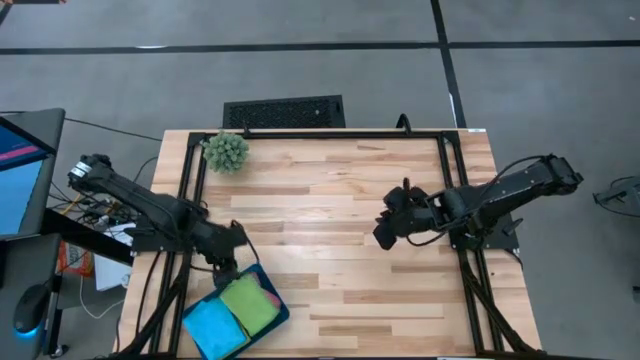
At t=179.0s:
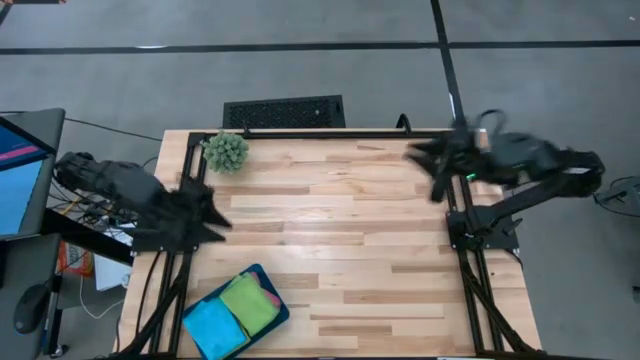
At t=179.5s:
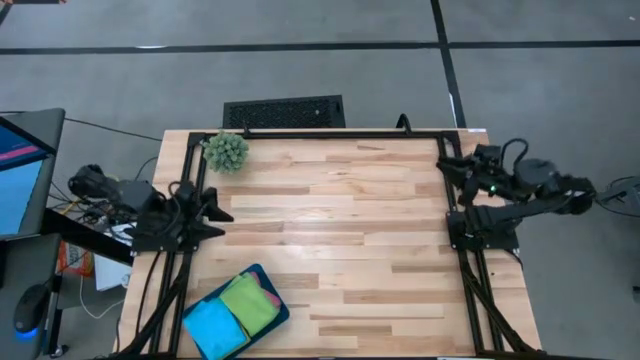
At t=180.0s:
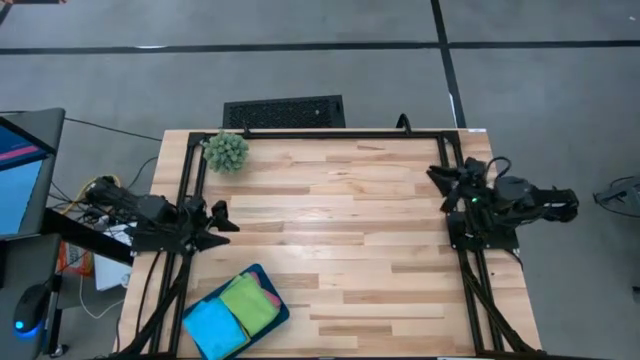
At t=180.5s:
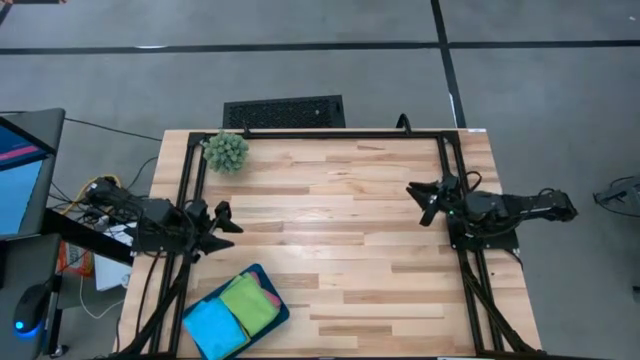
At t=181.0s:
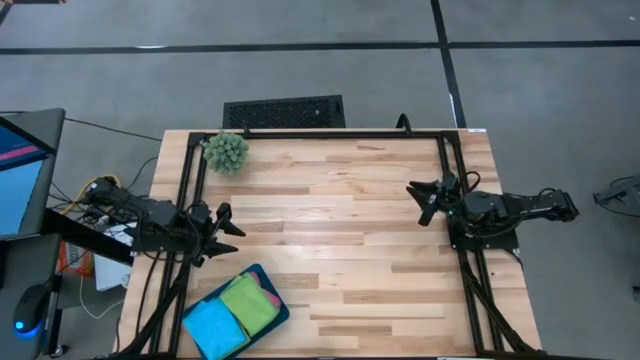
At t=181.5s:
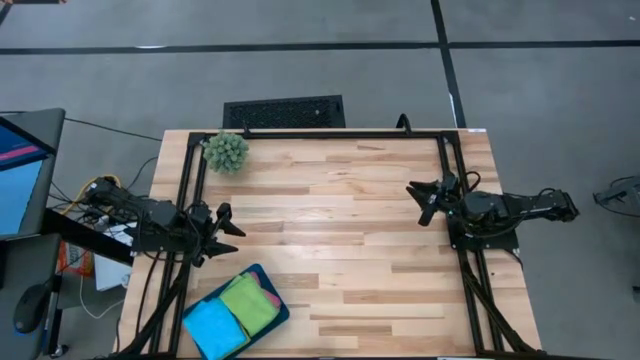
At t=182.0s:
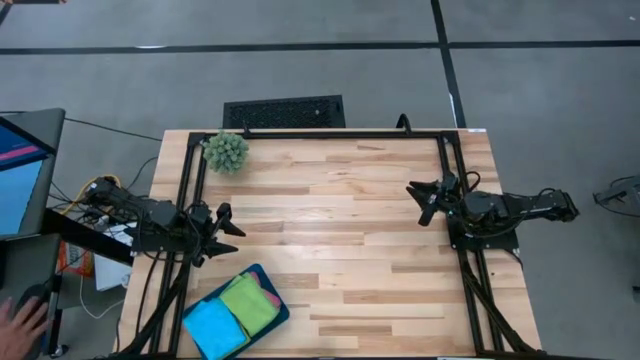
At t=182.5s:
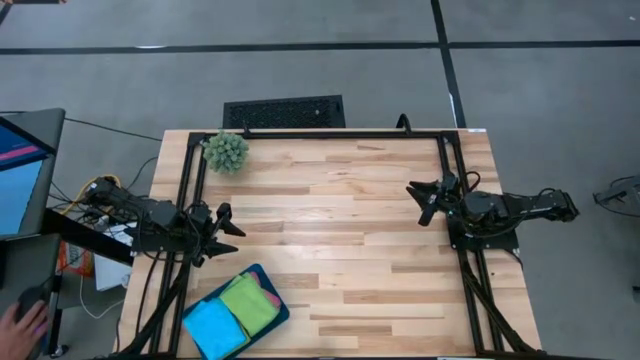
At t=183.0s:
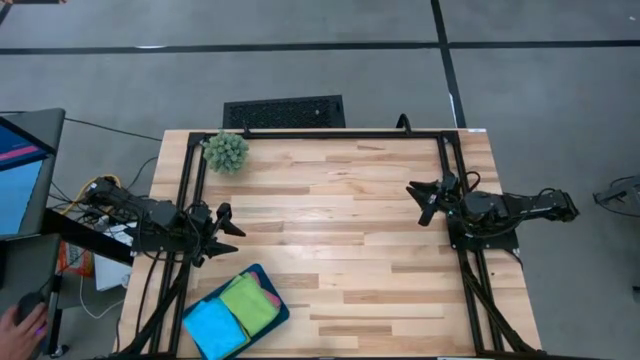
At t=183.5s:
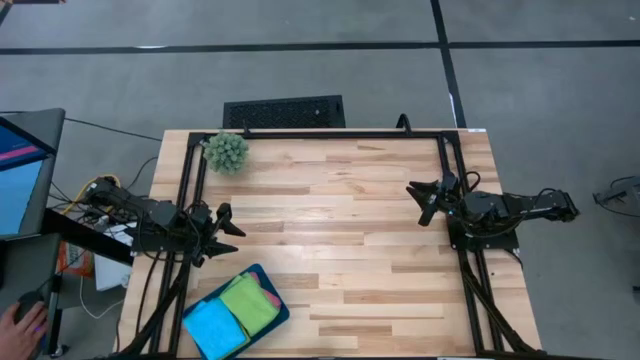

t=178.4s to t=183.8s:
Task: Fold microfiber towels
Return to Home Position

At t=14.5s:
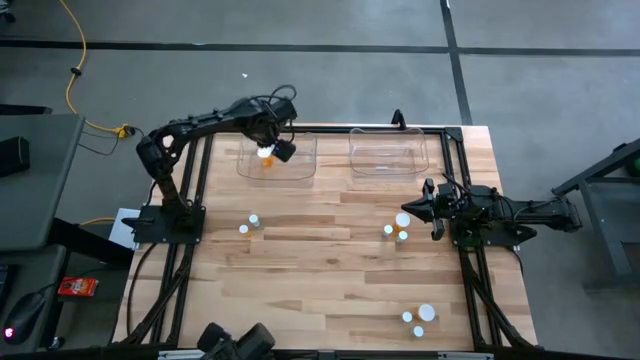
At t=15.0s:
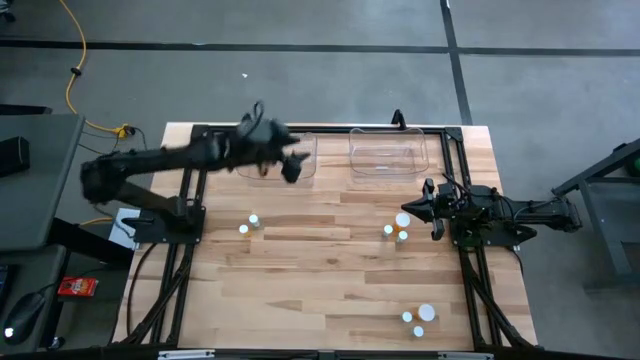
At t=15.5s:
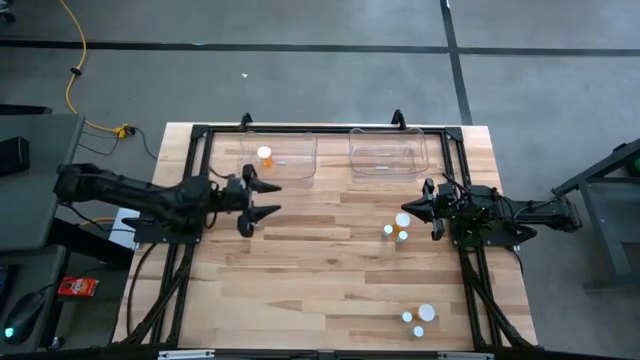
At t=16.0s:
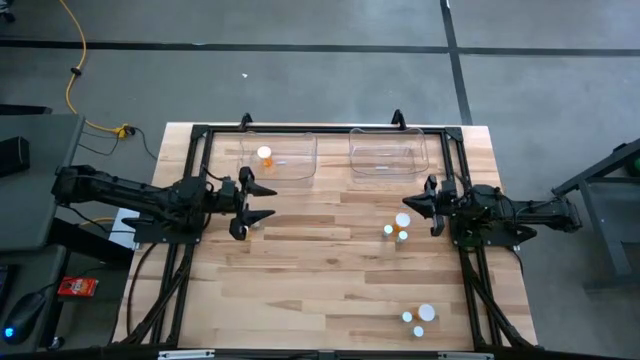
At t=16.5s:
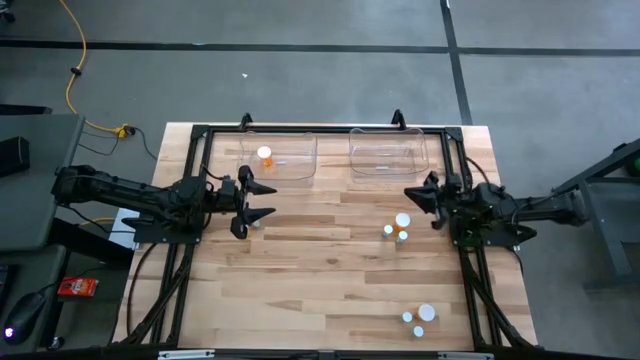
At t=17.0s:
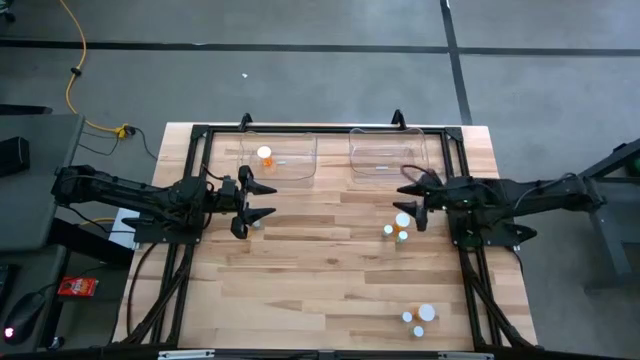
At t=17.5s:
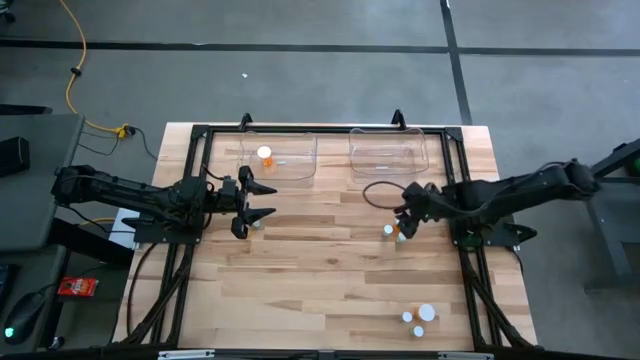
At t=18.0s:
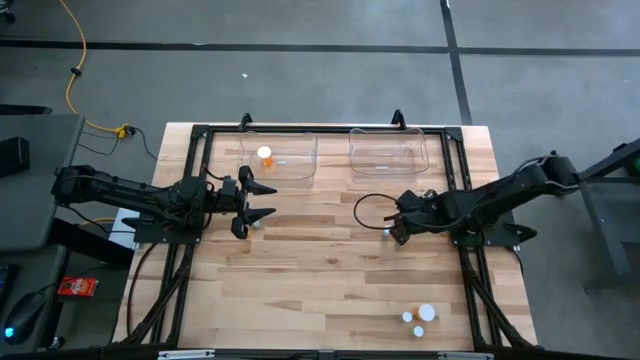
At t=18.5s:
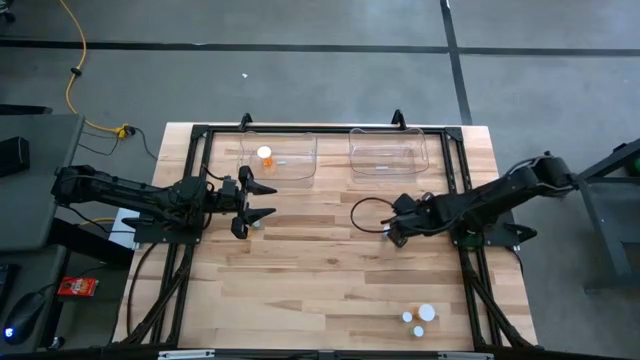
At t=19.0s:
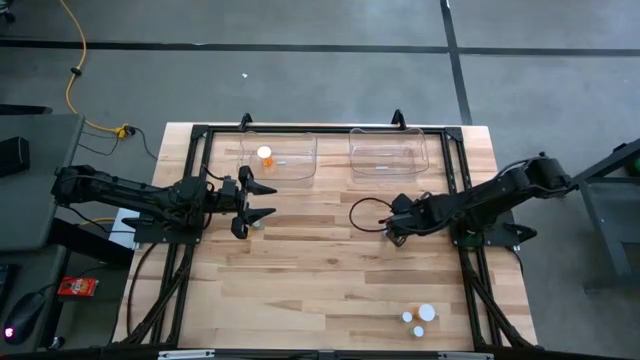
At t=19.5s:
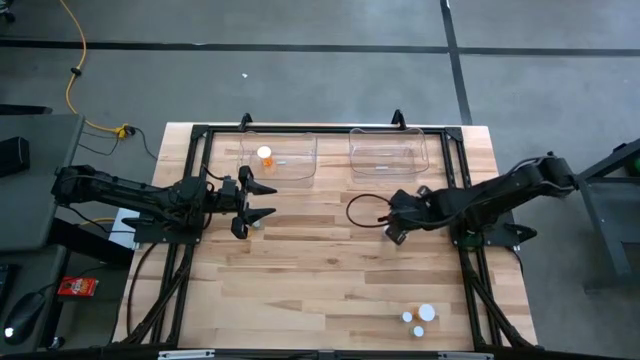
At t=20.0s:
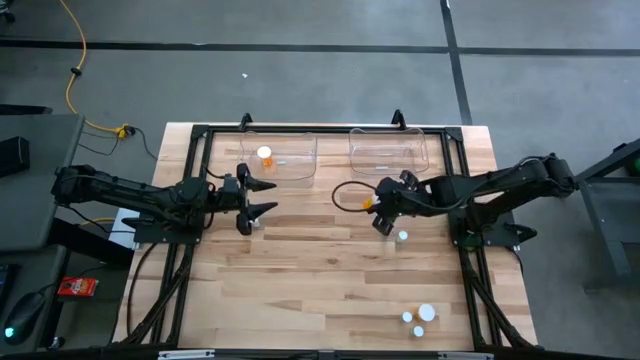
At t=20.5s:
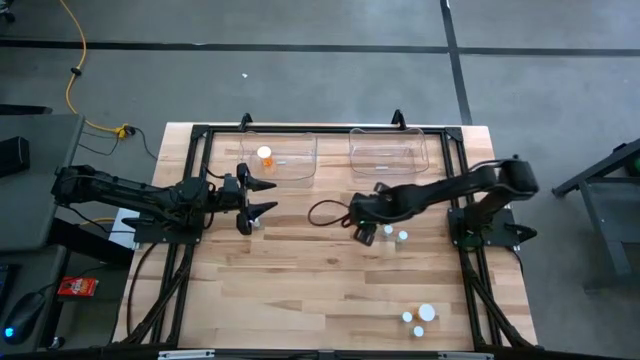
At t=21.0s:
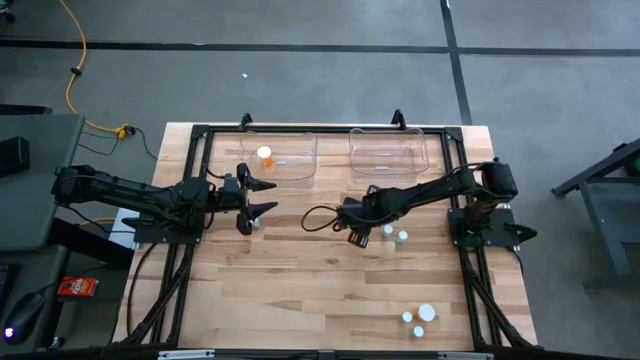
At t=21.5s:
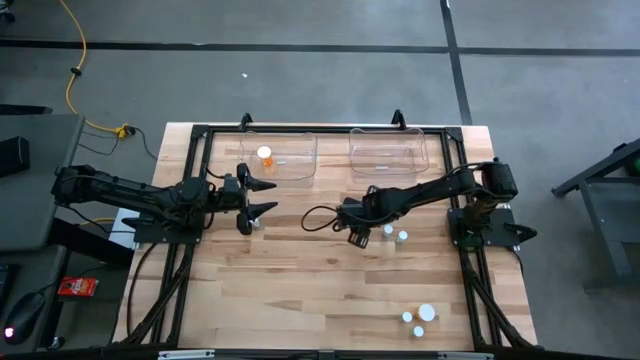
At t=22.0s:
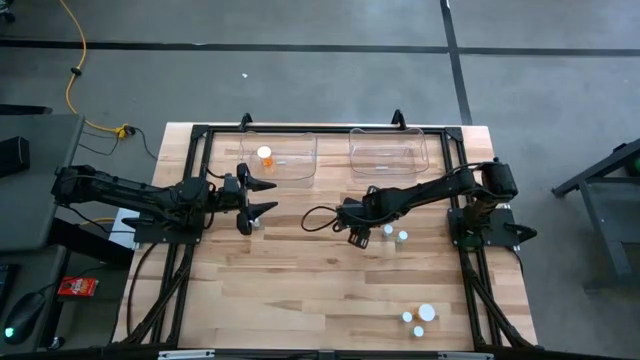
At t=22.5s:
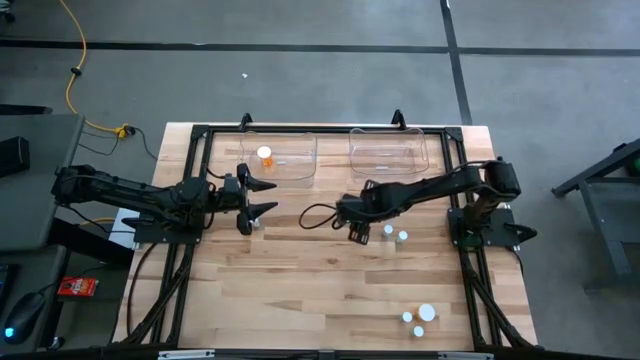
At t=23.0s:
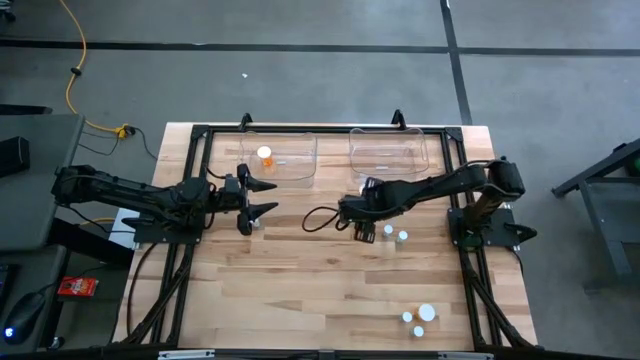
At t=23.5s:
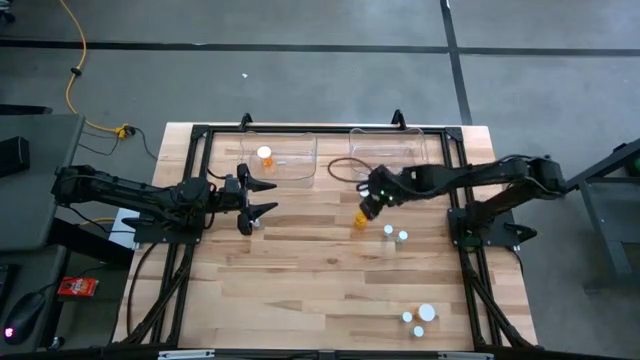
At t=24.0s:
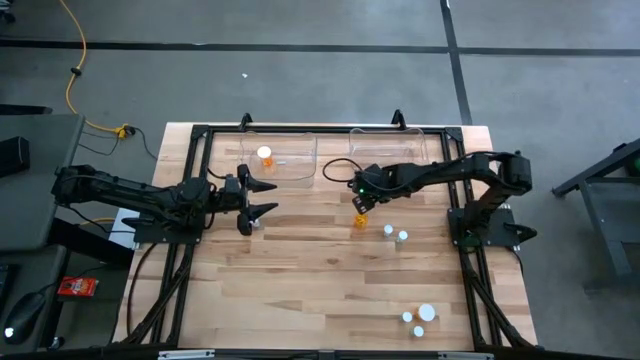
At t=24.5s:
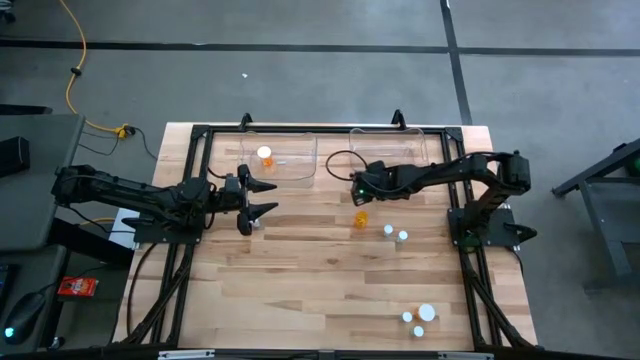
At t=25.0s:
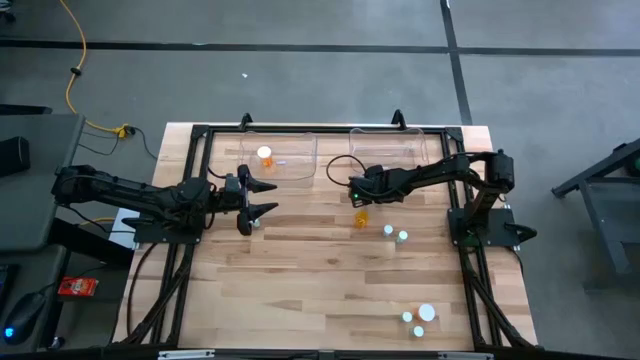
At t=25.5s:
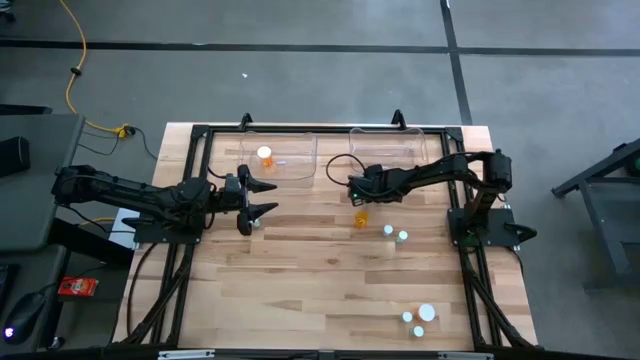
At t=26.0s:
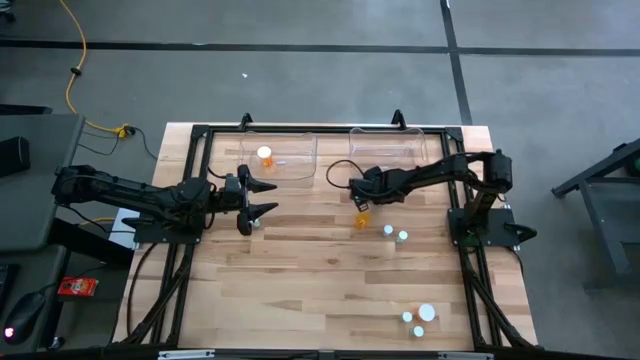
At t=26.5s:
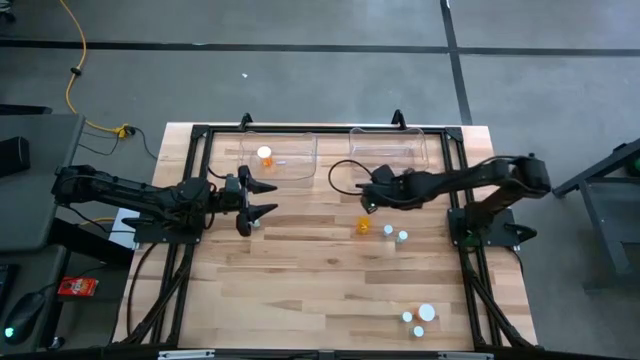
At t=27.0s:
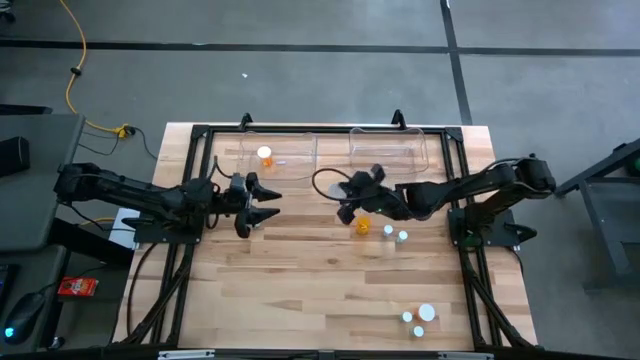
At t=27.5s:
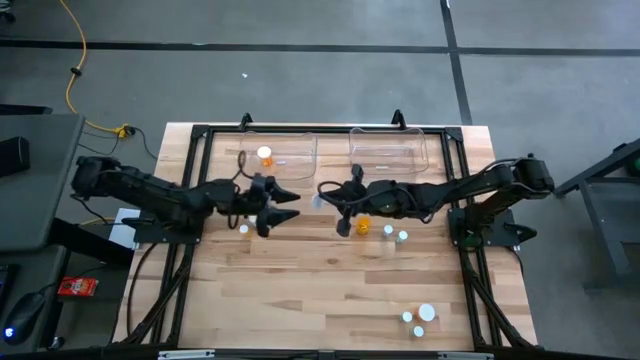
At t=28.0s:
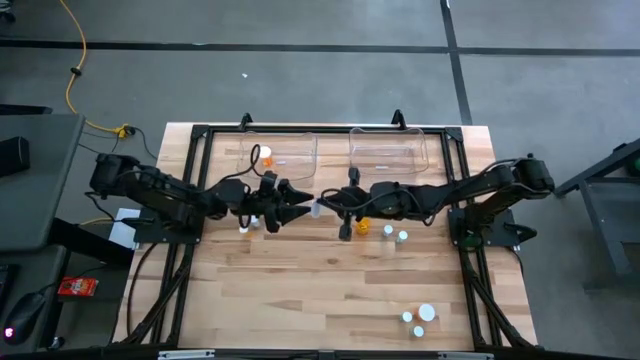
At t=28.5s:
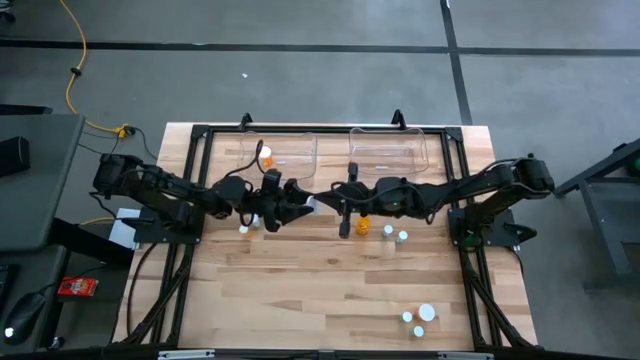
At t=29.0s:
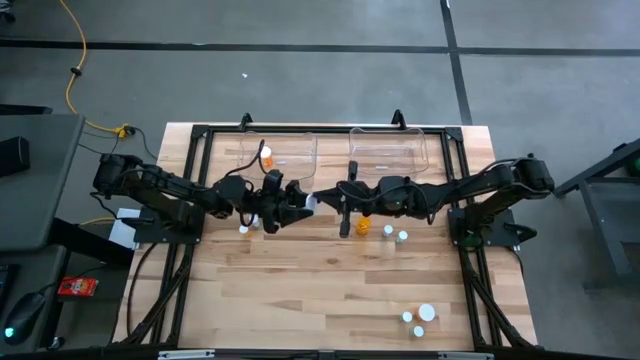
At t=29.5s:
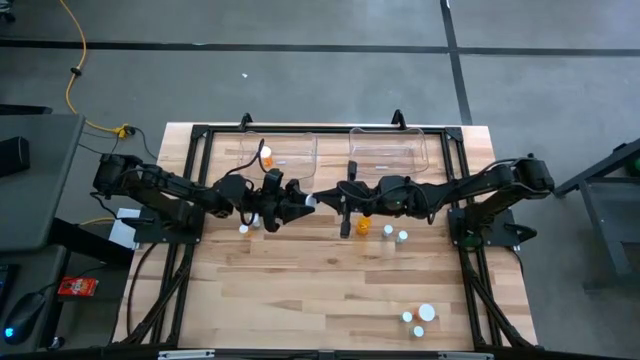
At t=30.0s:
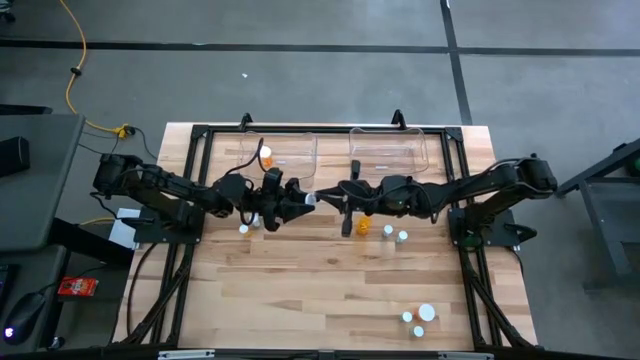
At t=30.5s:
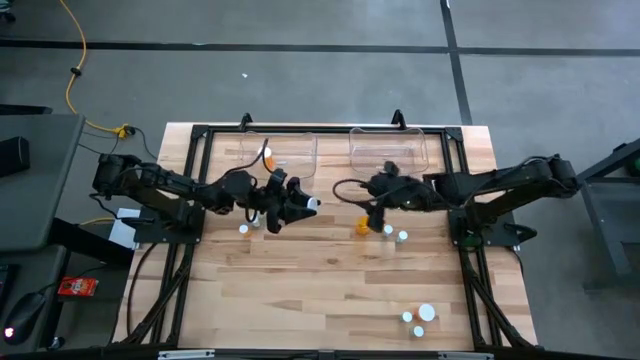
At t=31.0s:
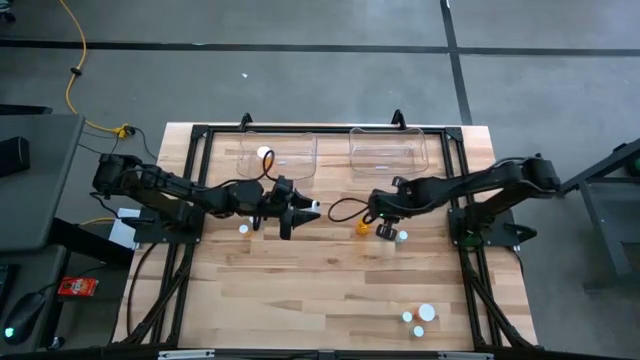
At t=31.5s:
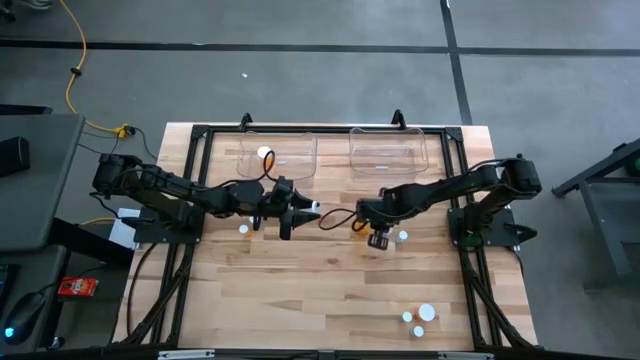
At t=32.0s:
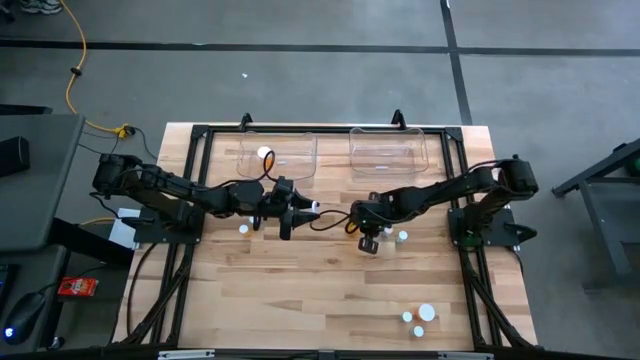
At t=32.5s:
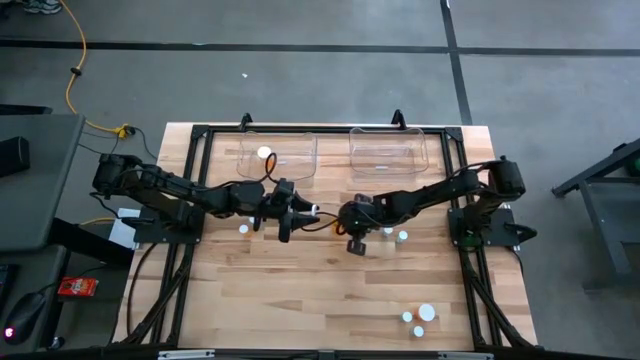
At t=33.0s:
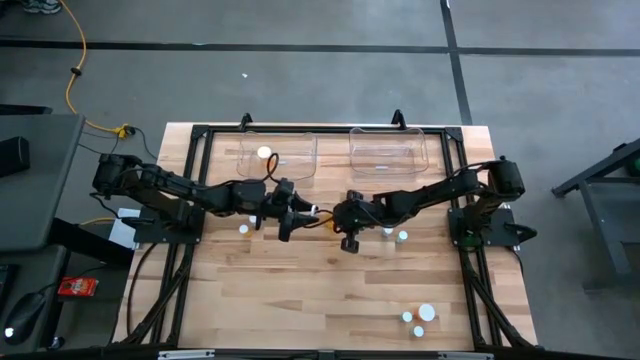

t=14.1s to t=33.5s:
Task: Pick and place medicine bottles into bin by pill shape (circle, oval)
Put the top orange capsule bottle into the left transparent bin
